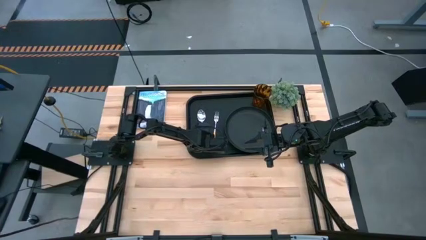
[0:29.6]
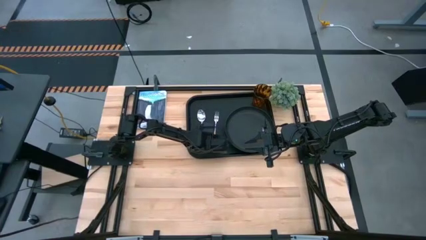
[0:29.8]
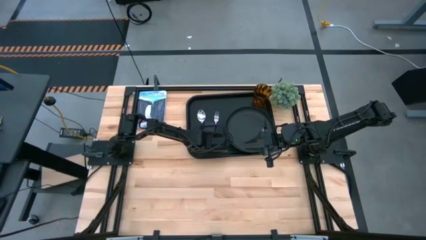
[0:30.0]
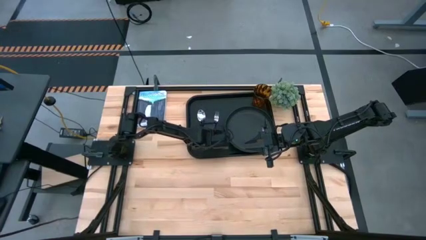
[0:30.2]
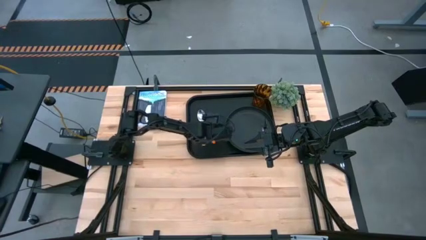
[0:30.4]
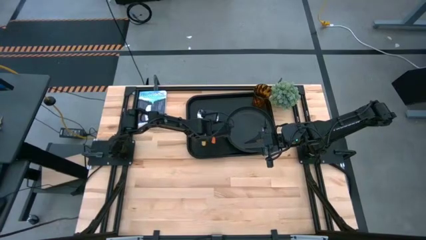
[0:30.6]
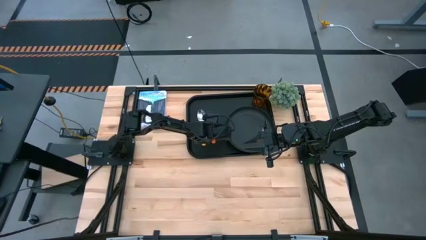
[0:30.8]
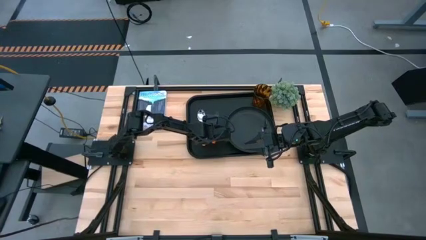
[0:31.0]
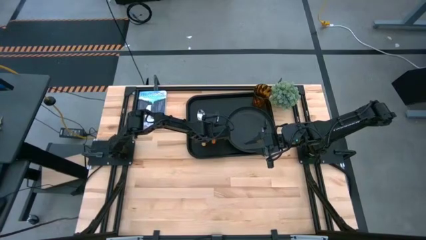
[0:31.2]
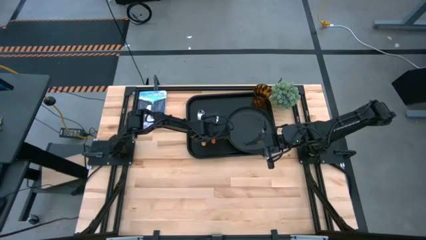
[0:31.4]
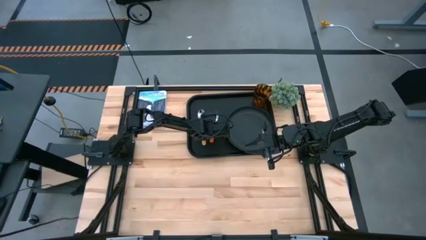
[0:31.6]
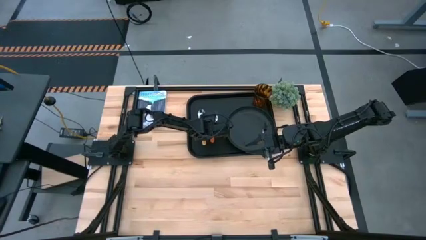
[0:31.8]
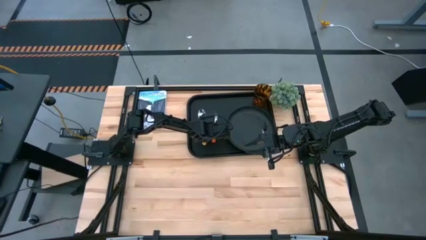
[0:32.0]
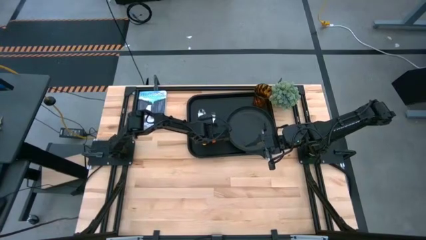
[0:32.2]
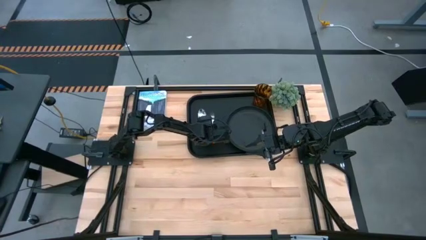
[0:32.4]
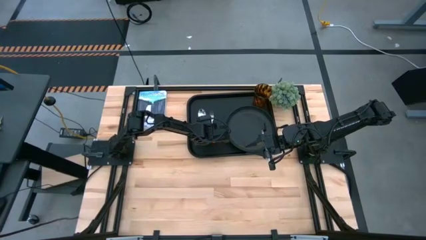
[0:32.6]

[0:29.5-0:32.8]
Task: Pick and place plate/cup/fork/spoon on tray
Adjust the orange fork on the black serving tray

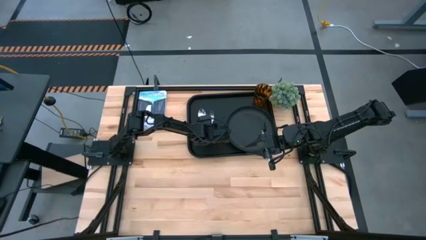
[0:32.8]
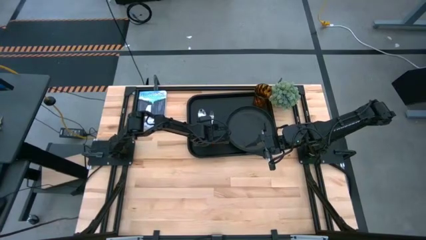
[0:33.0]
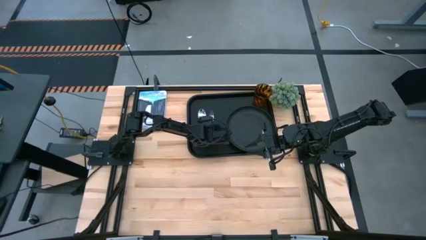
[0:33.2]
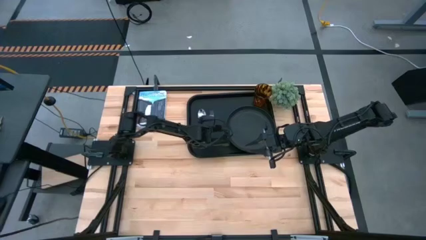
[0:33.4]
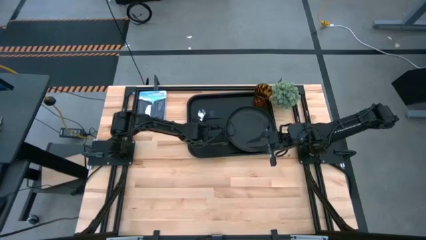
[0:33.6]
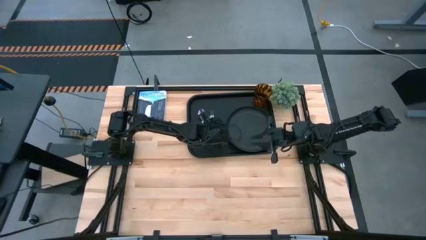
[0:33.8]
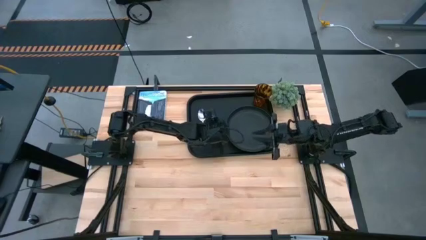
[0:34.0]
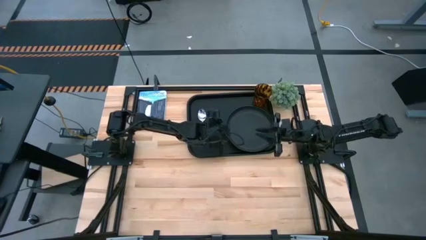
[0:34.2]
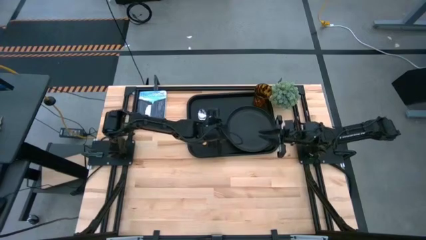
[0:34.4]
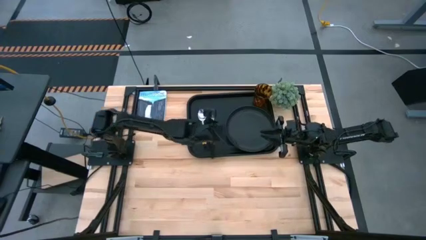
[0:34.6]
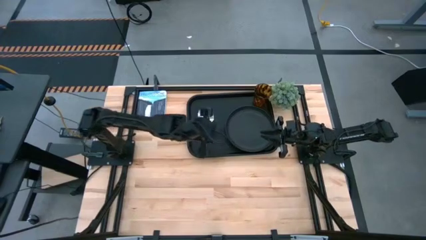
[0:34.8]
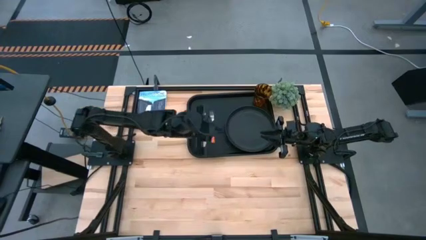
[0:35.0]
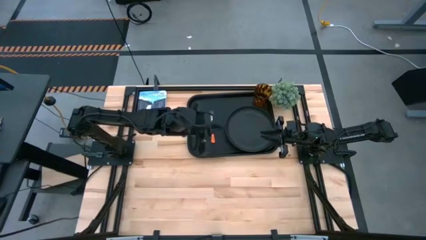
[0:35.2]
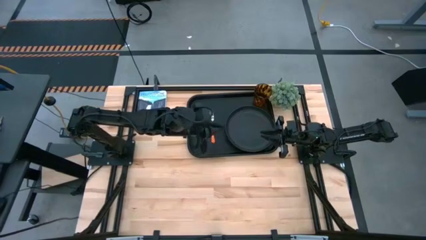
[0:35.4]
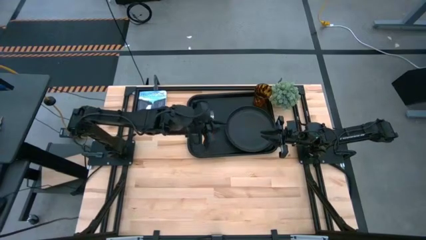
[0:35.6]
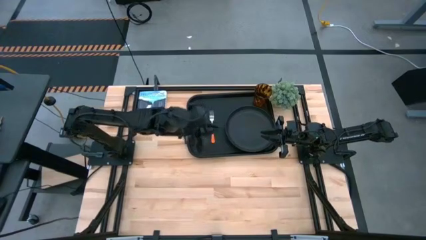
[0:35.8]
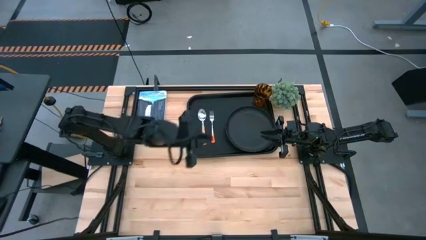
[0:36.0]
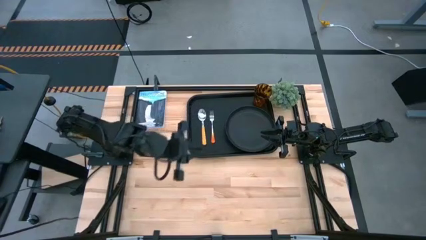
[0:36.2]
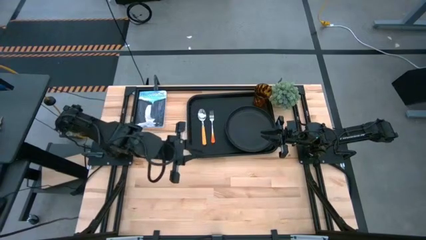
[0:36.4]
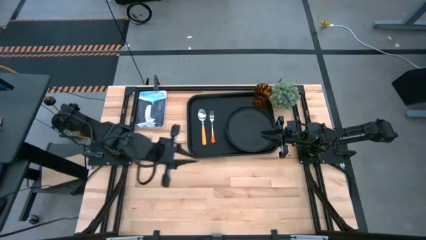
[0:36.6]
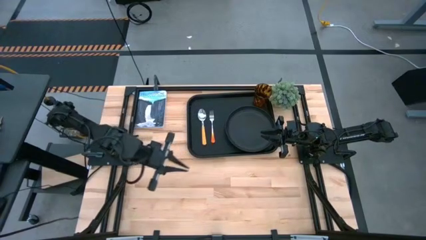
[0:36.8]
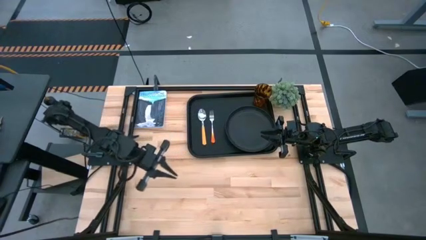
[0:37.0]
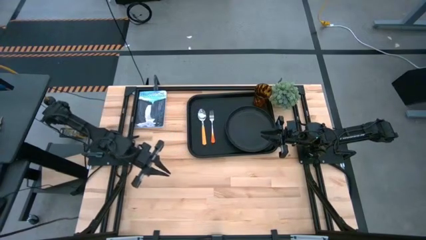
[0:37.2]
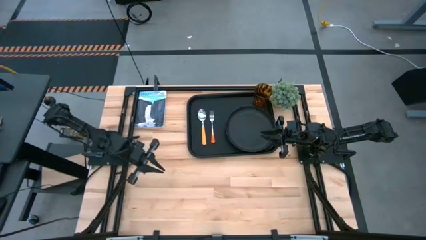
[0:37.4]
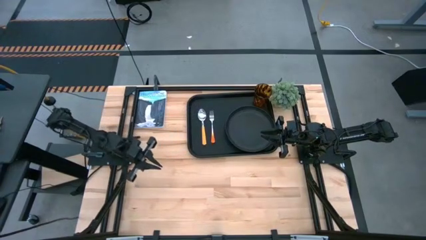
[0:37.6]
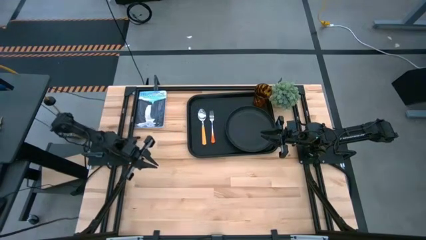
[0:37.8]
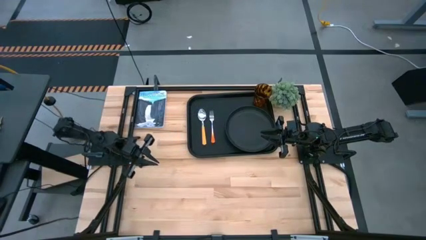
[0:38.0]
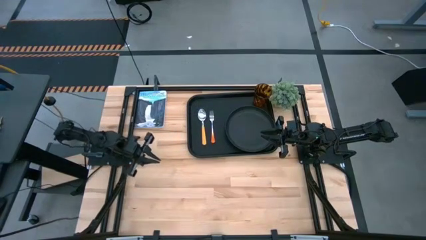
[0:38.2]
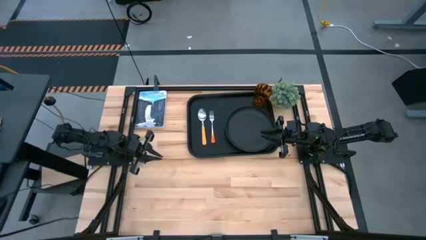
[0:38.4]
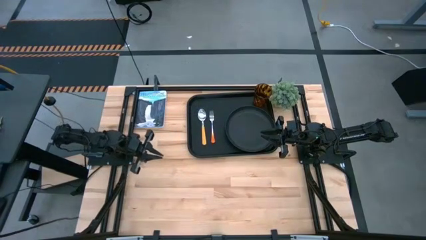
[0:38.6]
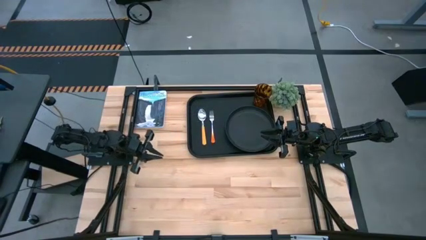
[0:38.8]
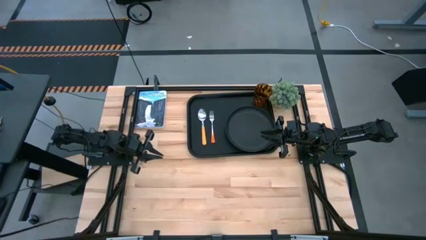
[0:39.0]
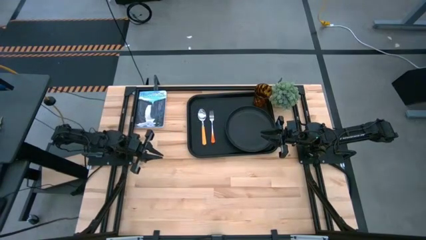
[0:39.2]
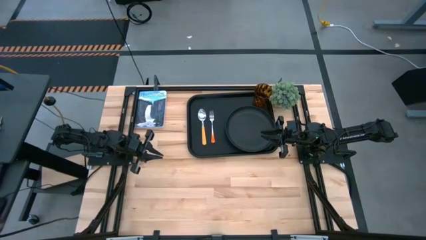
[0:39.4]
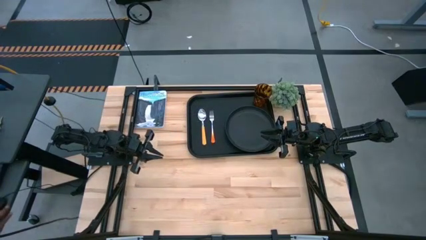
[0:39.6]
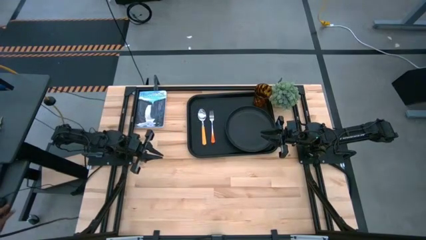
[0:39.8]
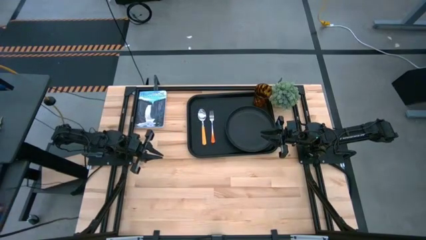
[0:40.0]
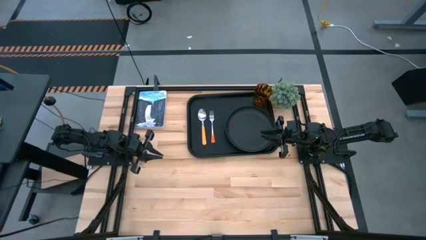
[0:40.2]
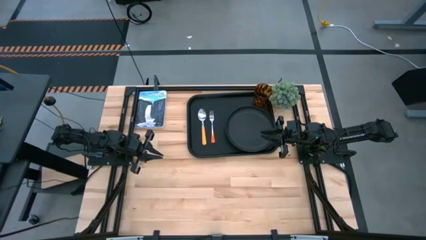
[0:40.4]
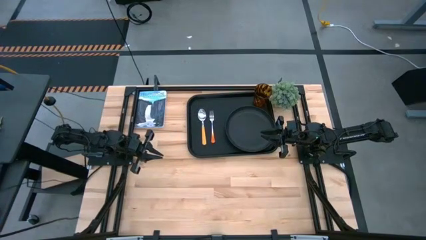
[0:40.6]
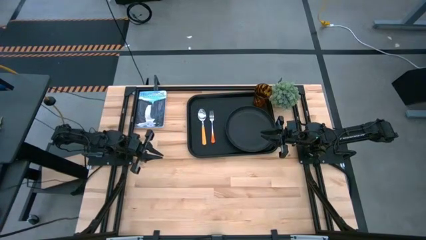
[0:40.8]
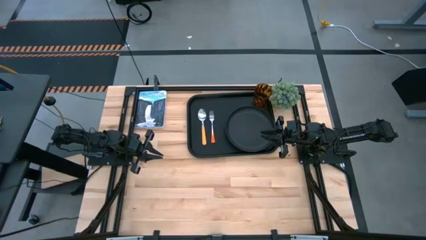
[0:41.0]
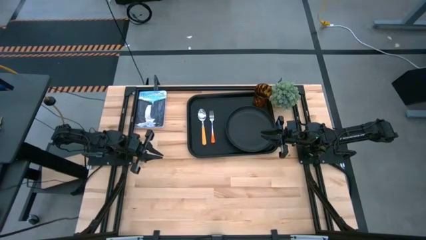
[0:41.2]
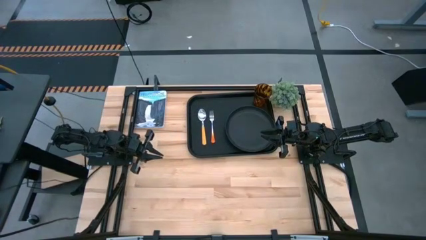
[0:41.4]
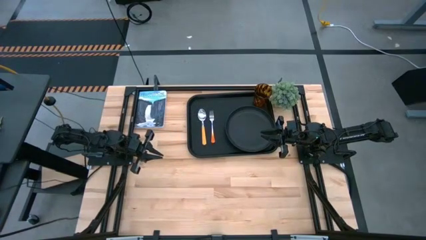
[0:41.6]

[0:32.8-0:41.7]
Return to Home Position

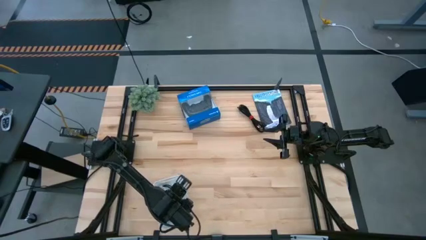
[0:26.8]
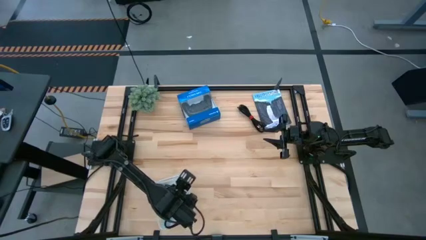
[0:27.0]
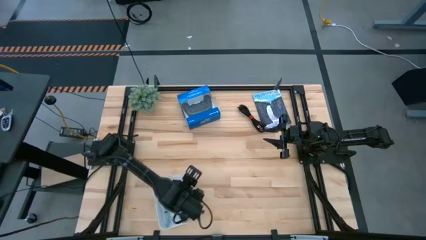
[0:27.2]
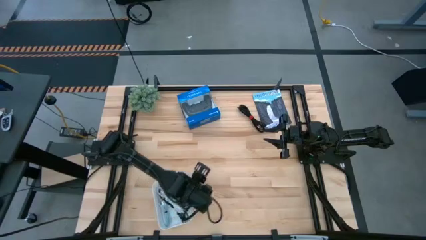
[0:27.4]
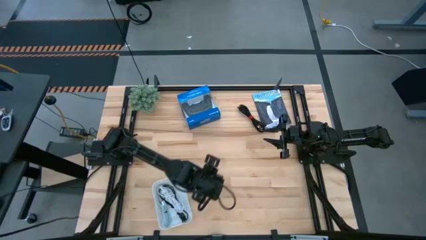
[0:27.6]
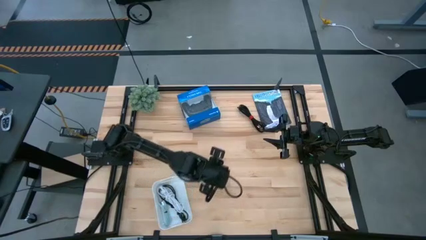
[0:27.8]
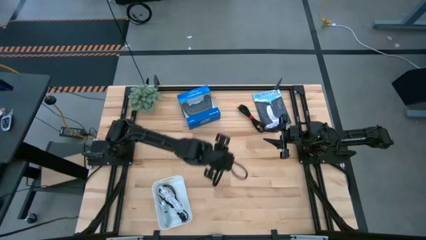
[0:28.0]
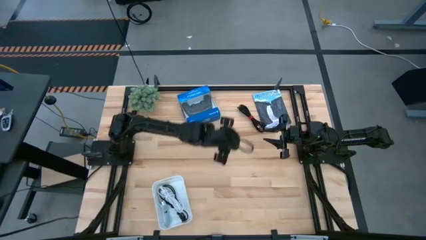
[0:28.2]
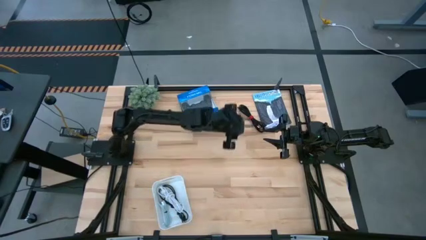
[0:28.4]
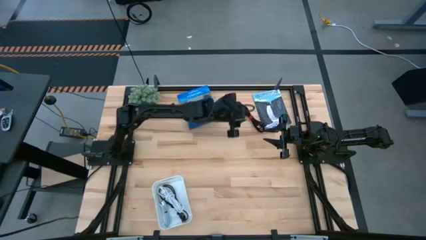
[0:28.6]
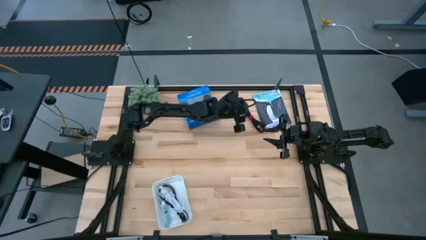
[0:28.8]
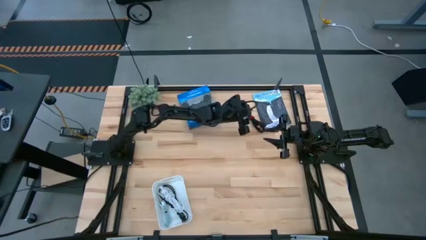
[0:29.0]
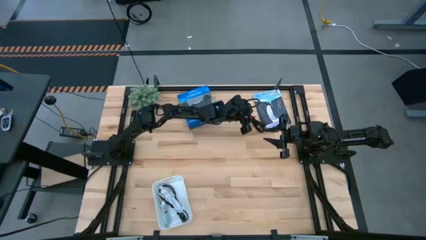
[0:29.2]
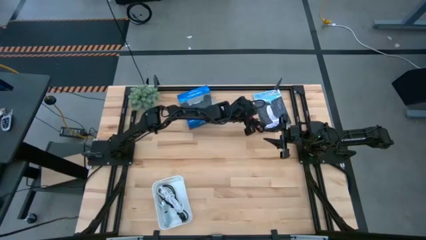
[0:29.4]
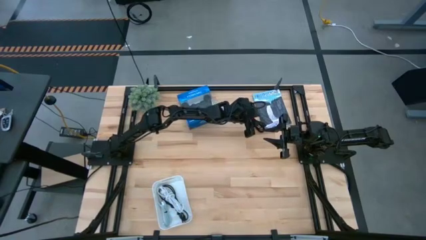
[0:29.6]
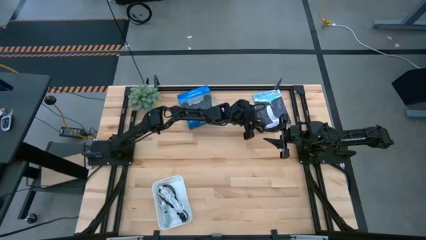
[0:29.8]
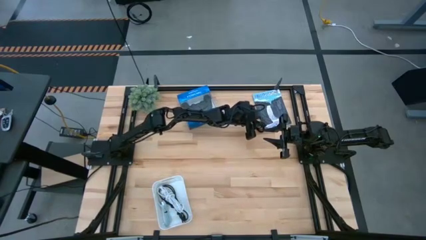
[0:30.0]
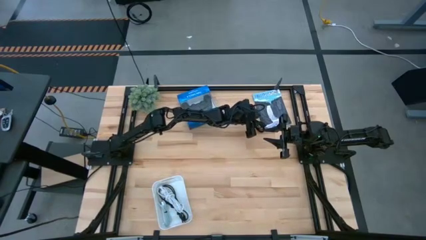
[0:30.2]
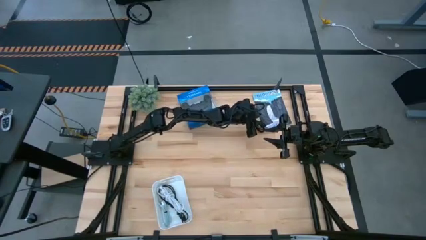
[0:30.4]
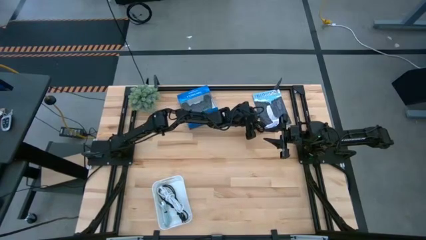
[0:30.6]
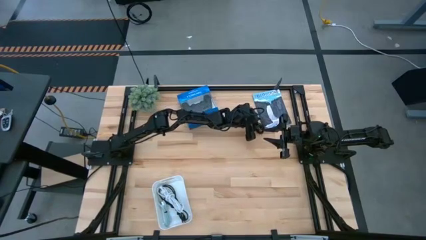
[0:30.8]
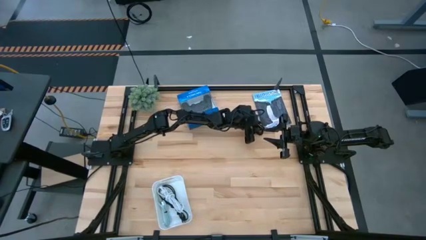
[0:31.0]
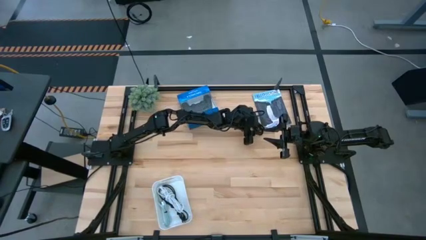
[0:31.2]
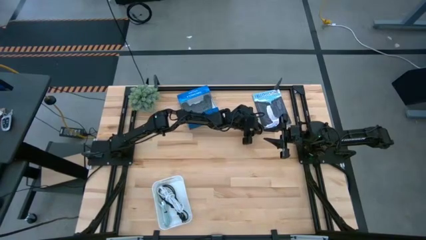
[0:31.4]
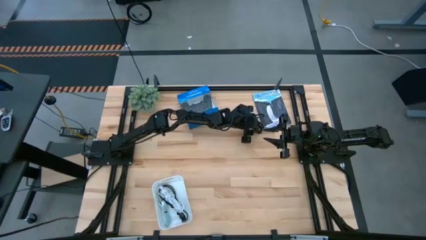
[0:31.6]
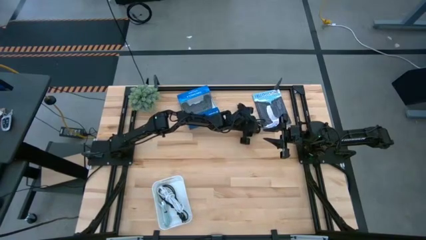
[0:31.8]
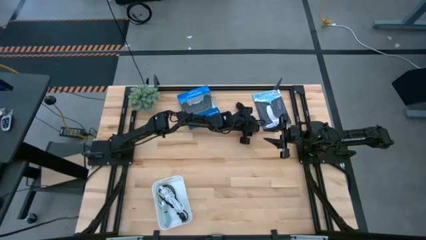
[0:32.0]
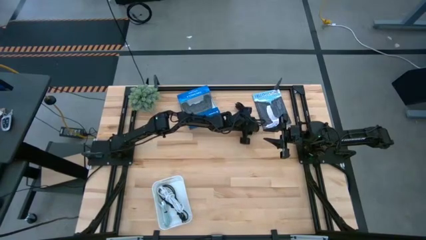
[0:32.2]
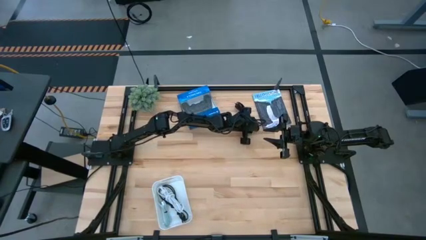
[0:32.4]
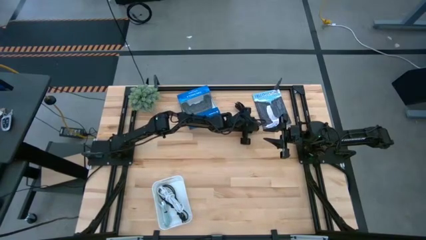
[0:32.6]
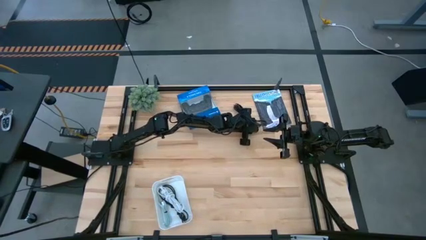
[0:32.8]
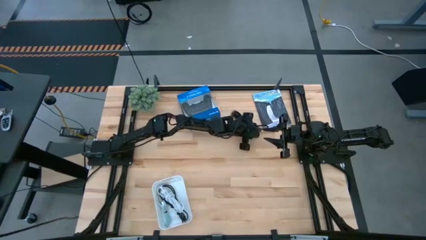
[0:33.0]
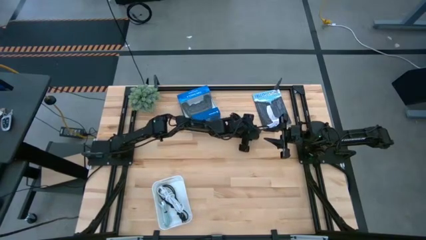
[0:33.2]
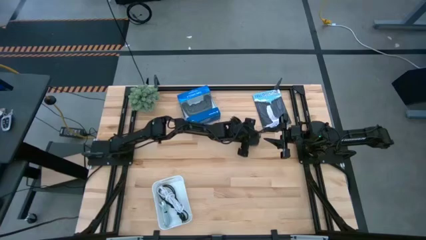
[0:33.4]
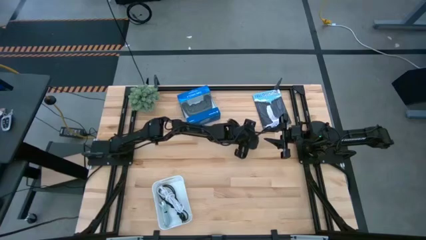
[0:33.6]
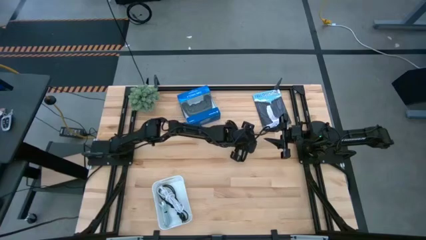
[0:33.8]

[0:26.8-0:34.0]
Task: Pick and place USB-C Cables
Put the black charger cable into the white bin
